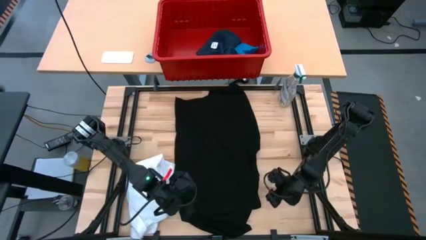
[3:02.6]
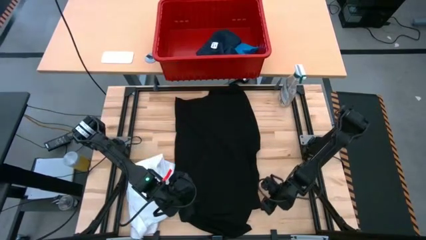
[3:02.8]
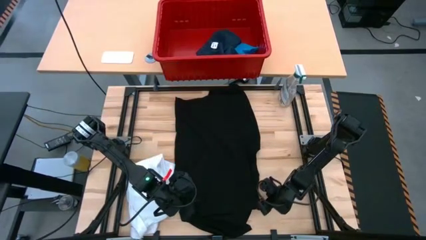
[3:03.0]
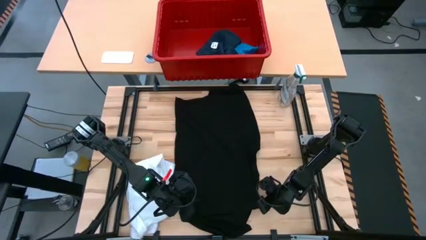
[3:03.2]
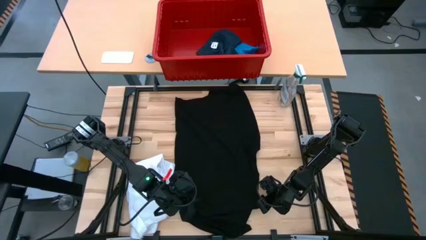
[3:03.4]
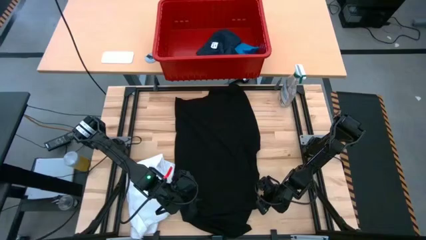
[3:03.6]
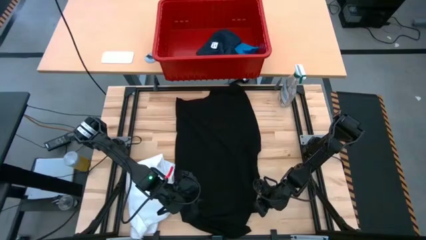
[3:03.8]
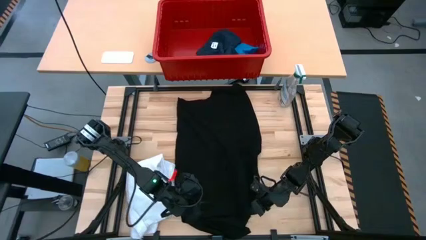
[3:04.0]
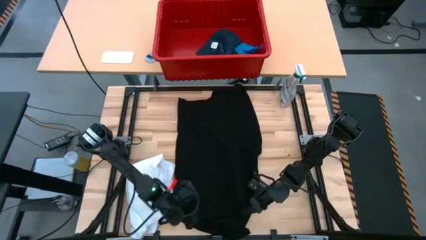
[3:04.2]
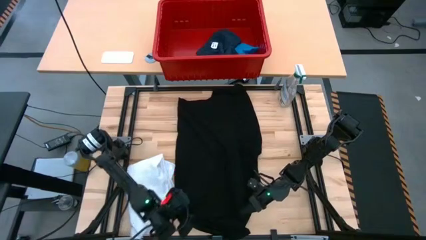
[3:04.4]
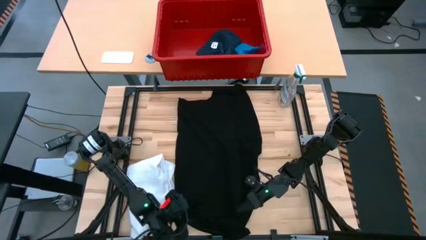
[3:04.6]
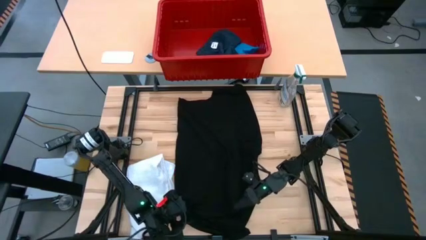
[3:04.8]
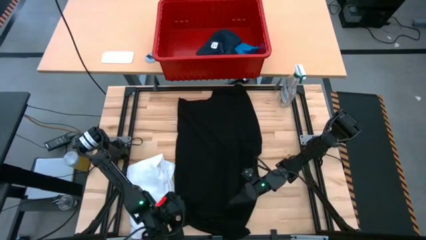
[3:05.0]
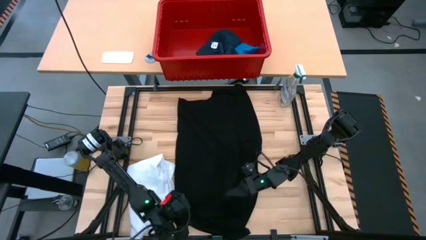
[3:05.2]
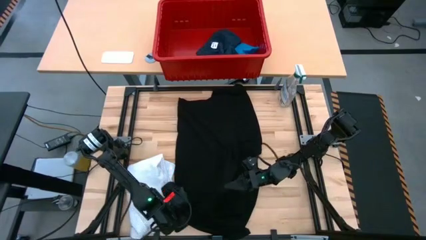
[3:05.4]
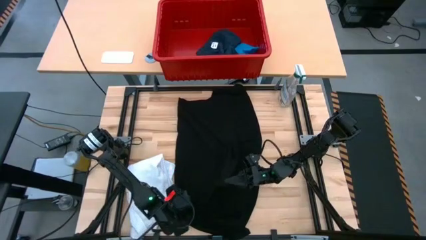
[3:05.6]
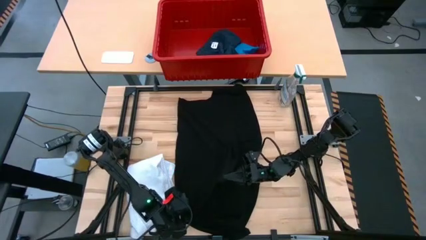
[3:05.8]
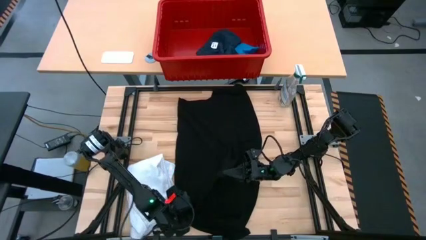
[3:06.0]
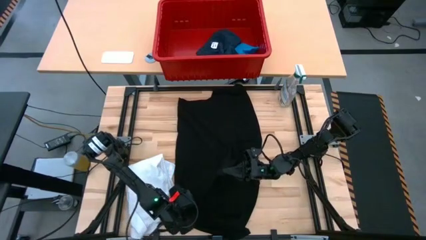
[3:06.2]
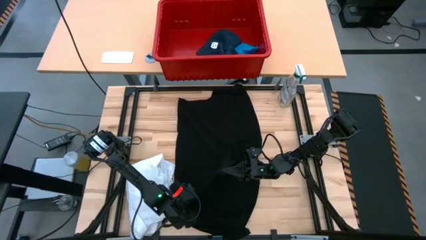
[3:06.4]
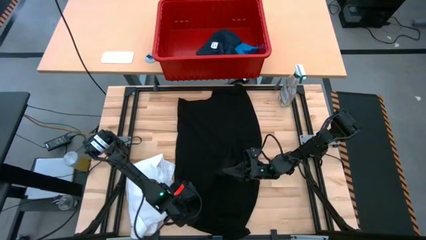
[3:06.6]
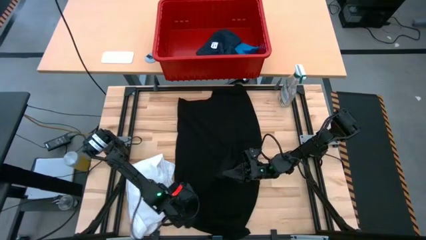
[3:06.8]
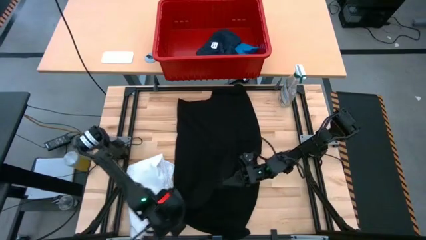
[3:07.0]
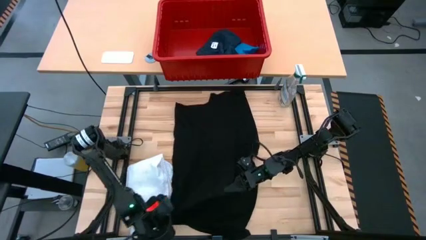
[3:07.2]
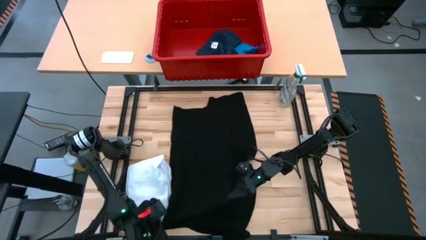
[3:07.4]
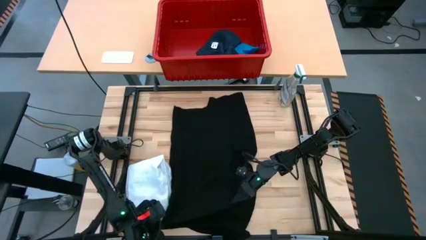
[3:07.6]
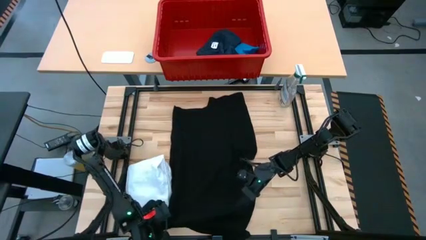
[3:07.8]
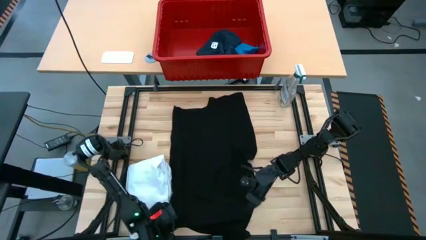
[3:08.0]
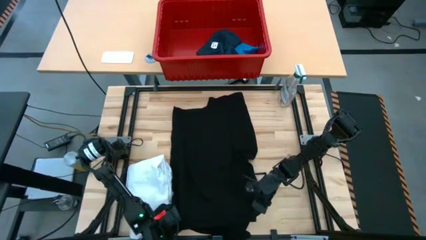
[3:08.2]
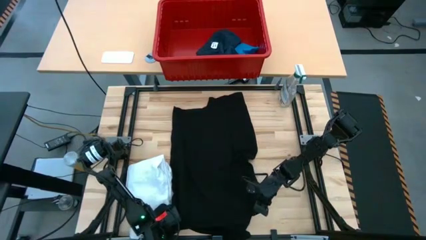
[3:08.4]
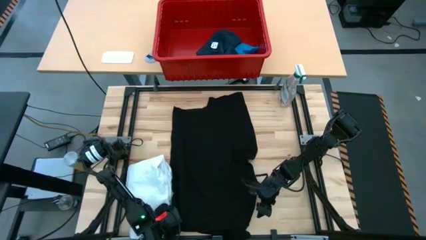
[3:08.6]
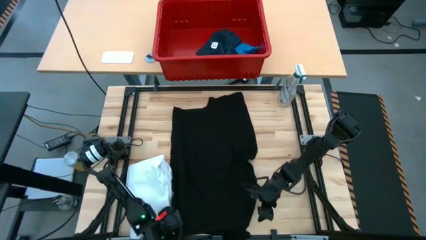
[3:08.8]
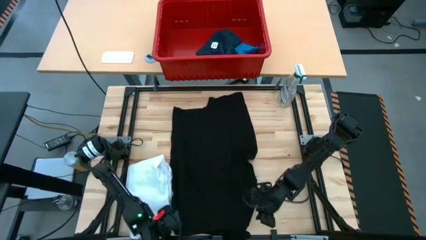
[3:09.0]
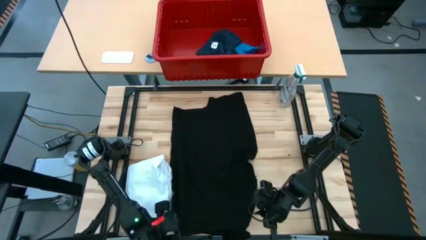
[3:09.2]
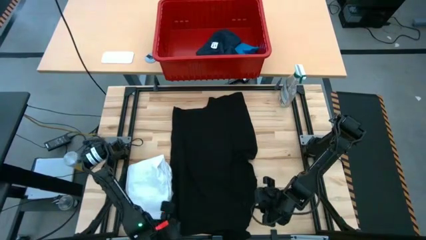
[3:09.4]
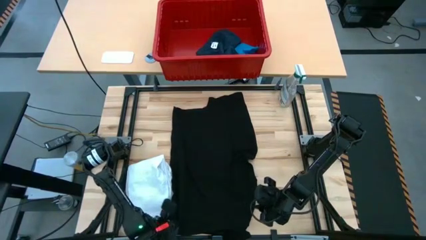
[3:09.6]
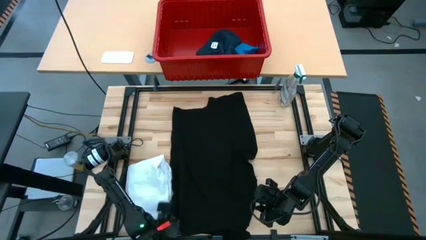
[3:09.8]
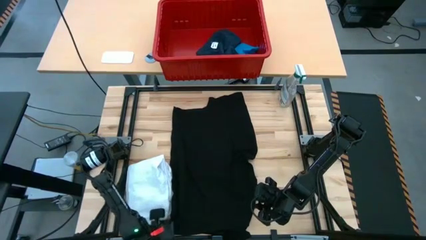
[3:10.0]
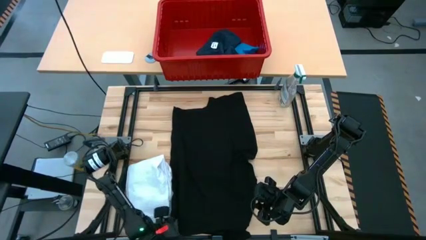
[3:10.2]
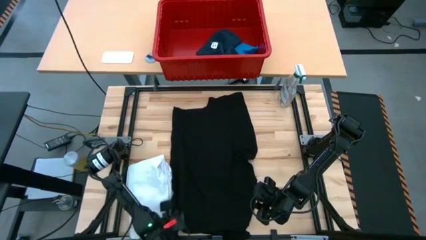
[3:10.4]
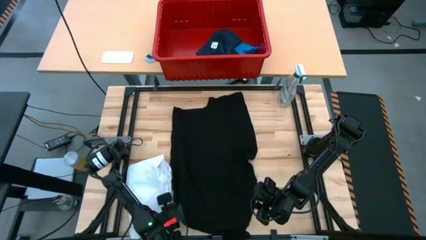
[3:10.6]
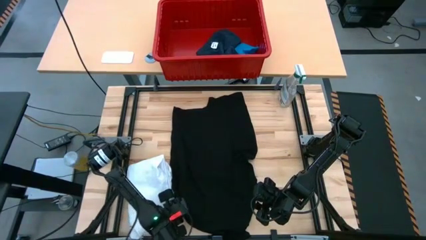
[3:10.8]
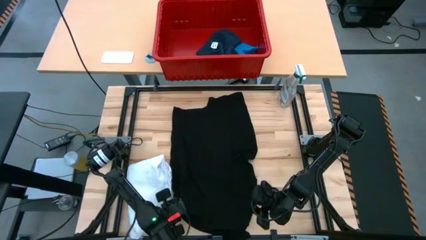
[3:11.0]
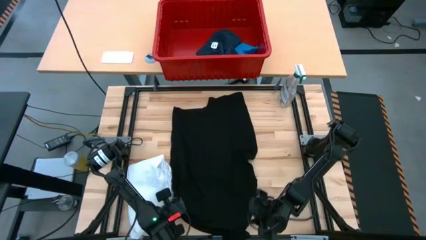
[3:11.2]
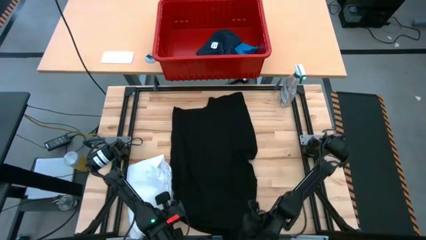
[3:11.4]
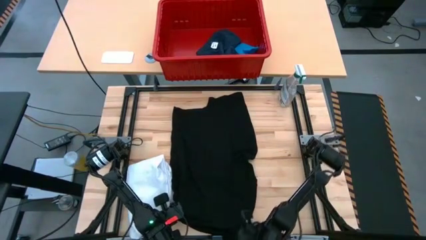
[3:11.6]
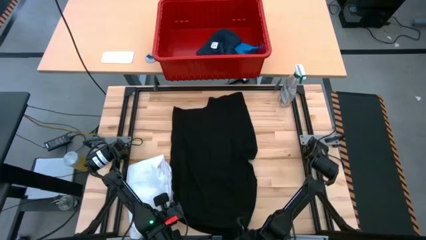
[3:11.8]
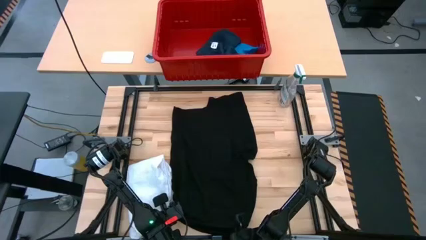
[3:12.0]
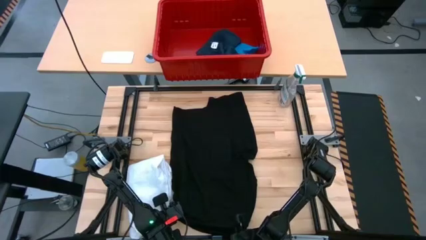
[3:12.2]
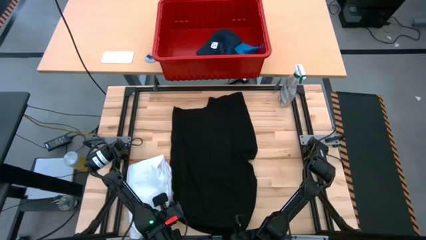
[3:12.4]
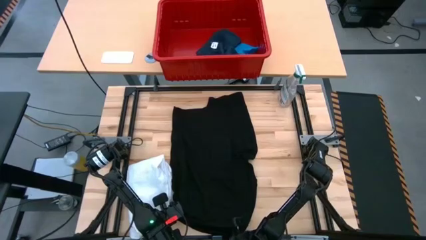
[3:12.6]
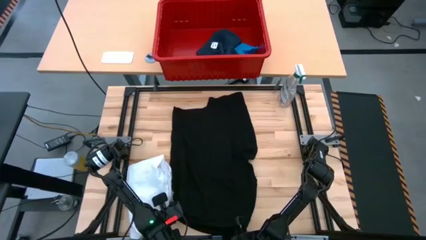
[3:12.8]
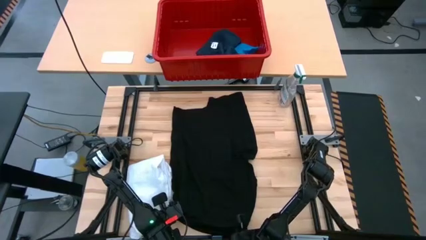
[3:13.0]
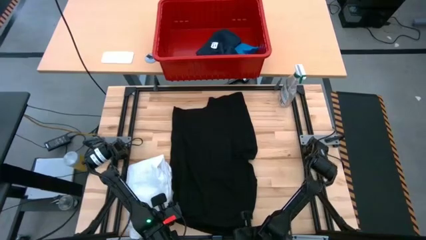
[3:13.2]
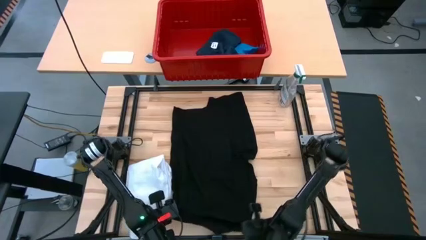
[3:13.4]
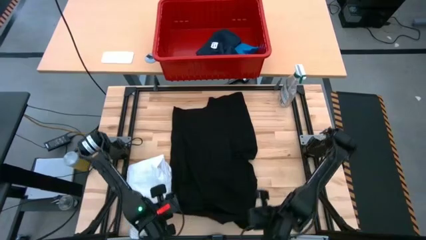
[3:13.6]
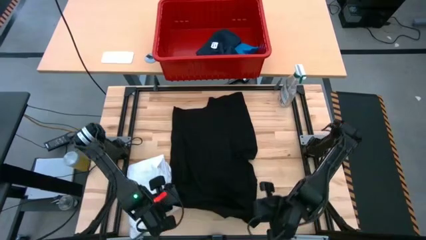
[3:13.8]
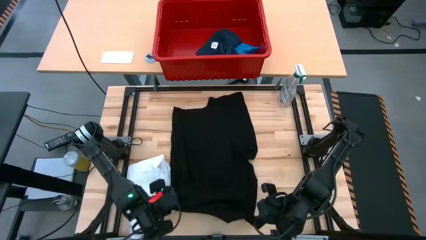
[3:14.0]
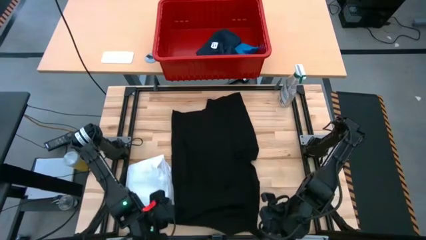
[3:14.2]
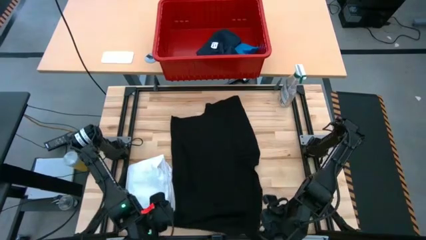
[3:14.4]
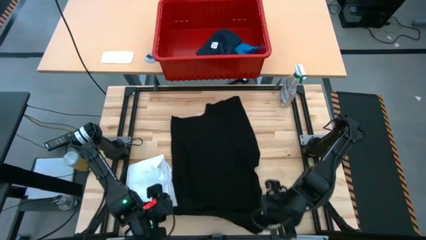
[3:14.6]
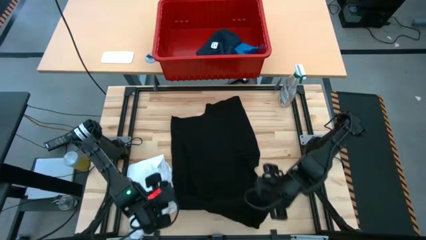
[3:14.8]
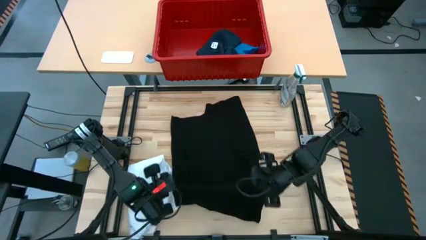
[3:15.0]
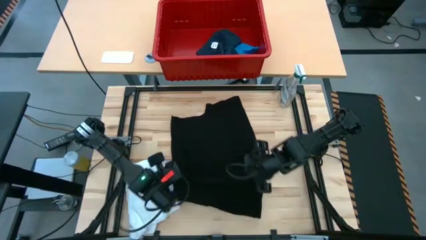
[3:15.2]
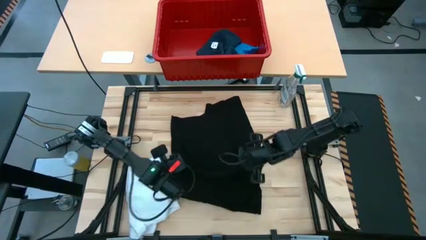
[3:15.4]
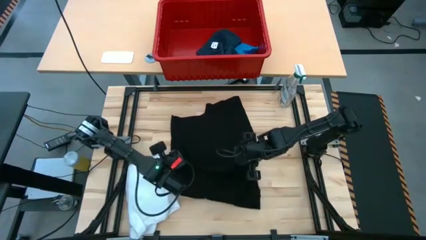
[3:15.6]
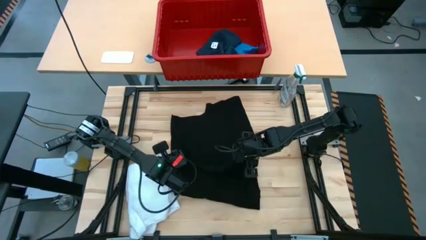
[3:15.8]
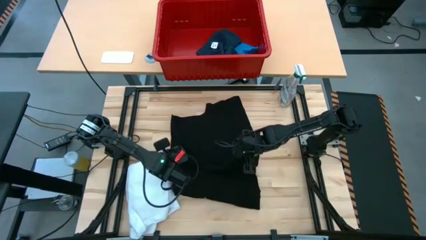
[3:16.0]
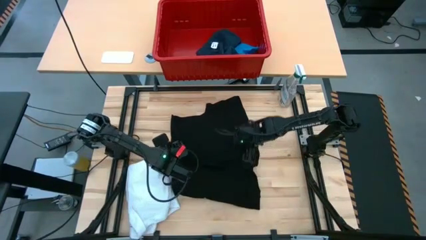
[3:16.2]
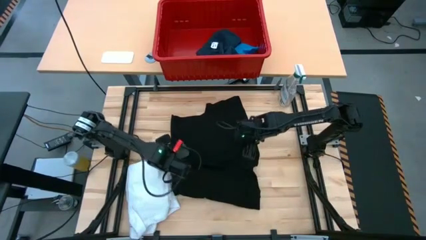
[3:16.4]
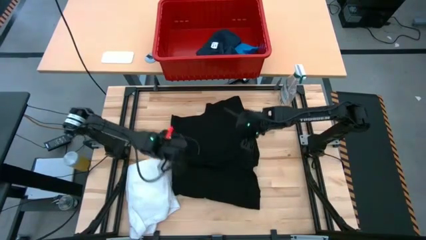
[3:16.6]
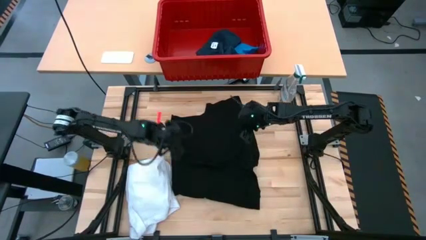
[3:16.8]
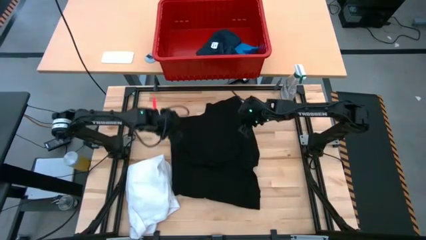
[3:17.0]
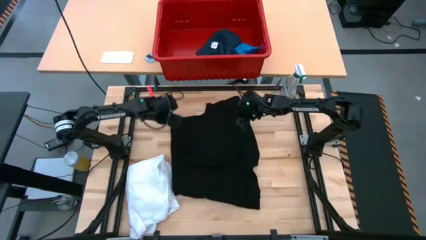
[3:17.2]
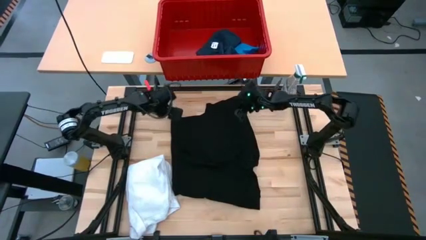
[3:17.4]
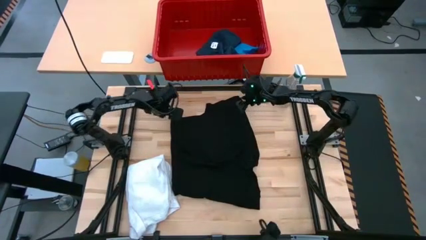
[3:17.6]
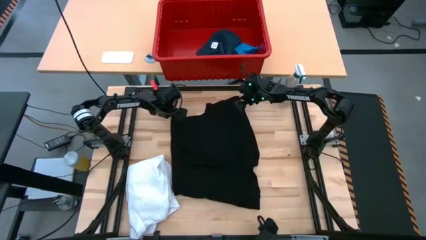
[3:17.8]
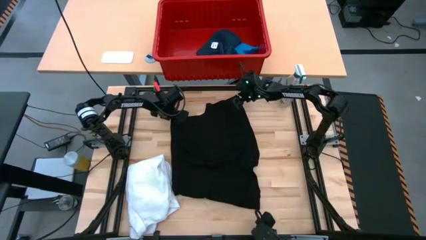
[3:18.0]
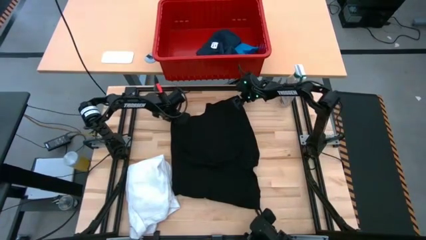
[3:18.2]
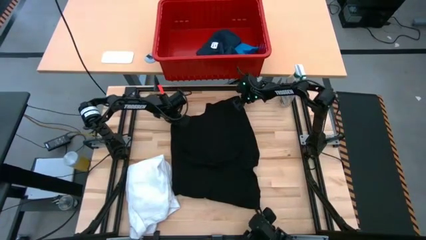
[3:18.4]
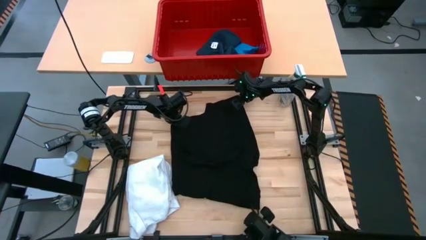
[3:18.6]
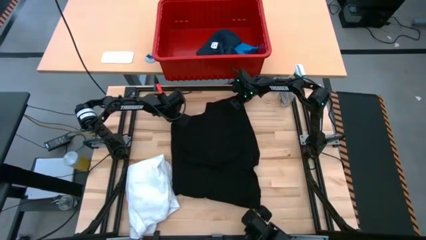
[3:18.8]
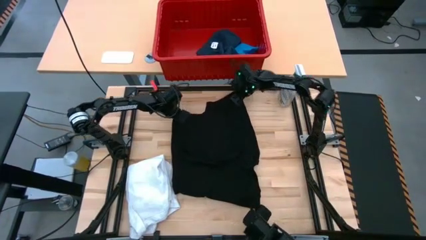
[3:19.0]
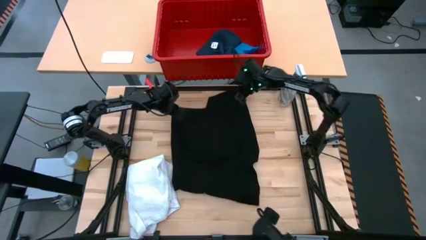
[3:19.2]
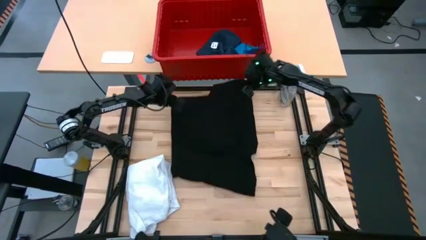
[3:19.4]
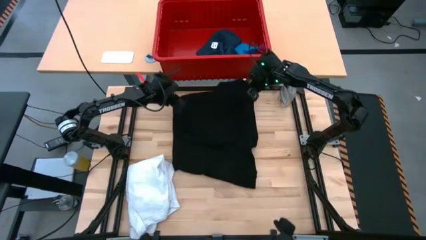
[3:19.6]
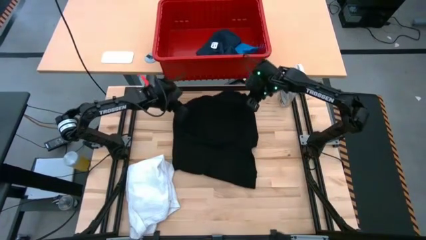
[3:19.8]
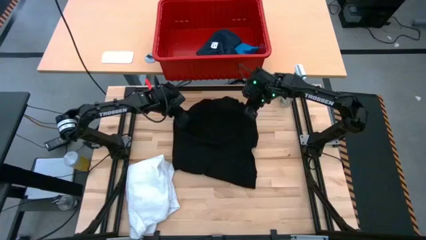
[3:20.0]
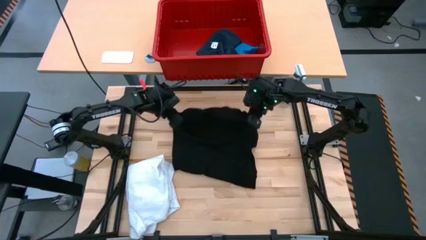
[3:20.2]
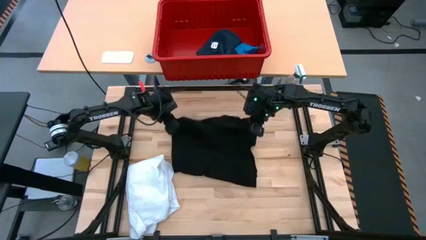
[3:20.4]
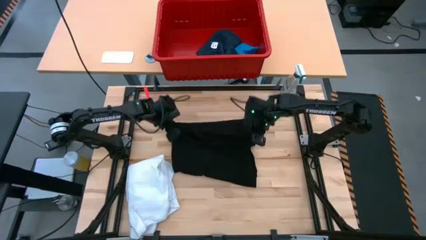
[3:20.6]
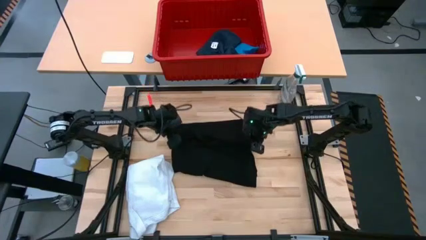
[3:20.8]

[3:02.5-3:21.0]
Task: Fold Laundry from Bin
Fold the black shirt
